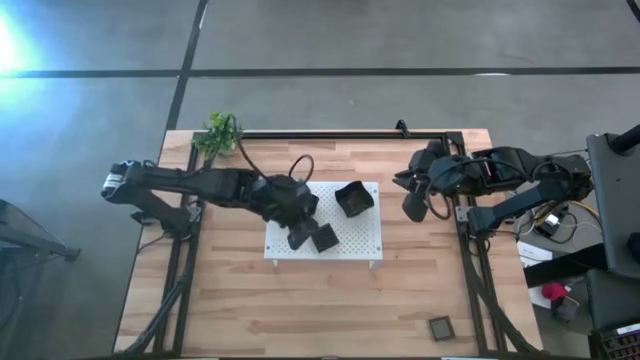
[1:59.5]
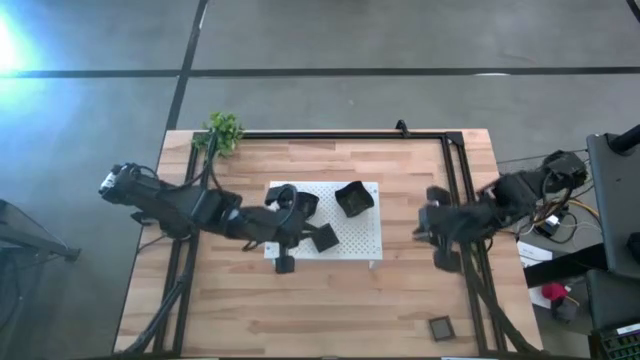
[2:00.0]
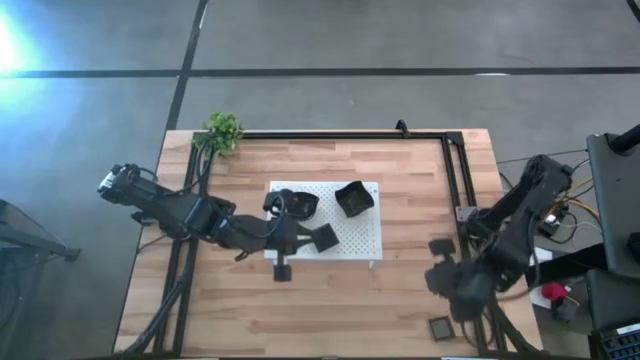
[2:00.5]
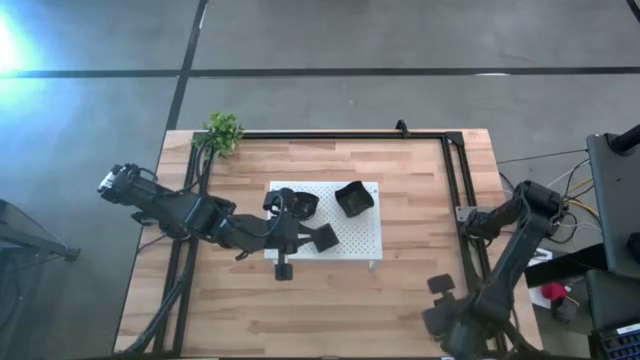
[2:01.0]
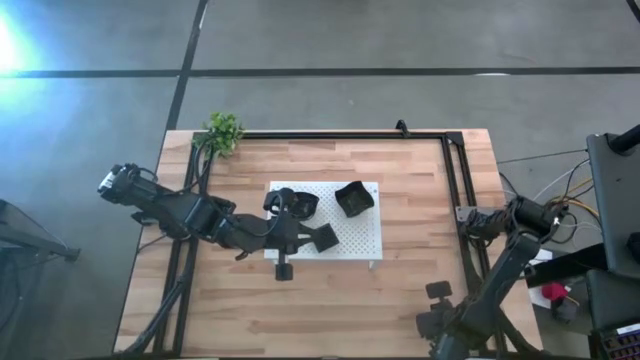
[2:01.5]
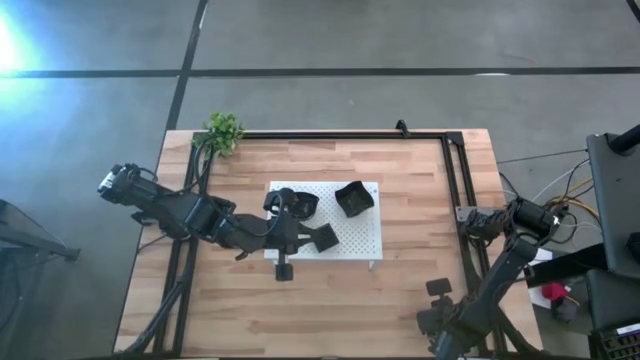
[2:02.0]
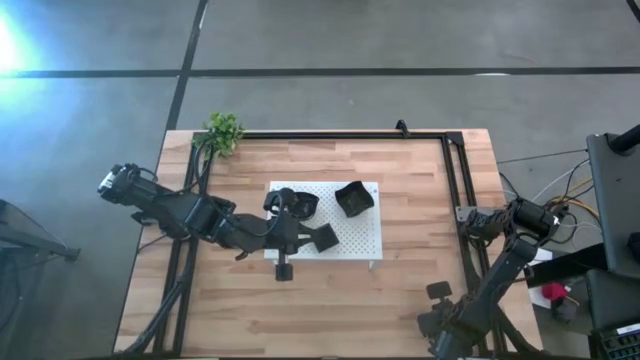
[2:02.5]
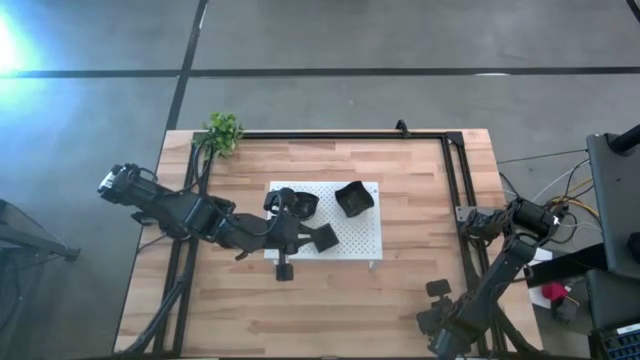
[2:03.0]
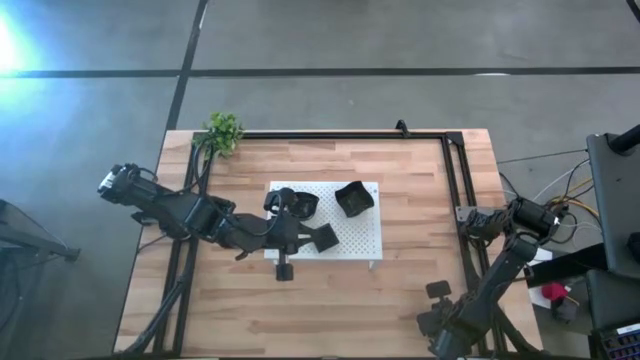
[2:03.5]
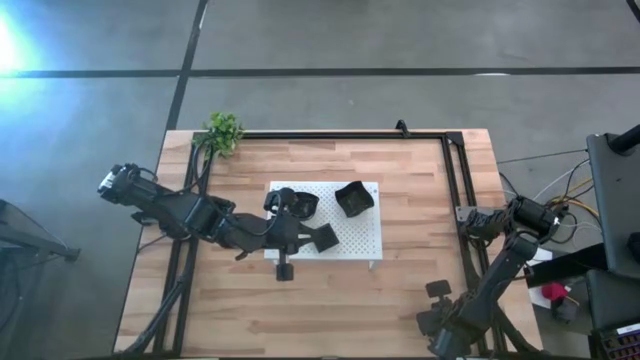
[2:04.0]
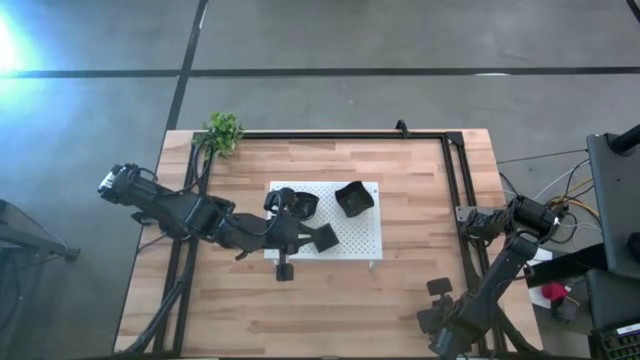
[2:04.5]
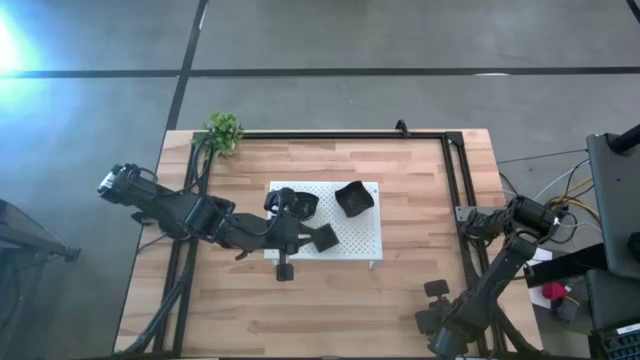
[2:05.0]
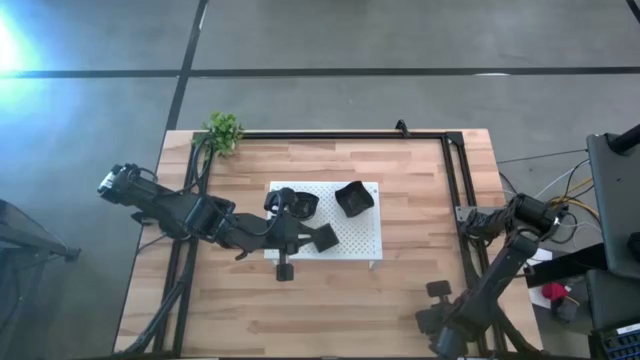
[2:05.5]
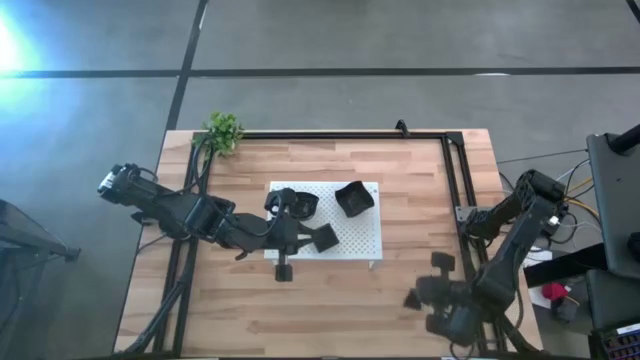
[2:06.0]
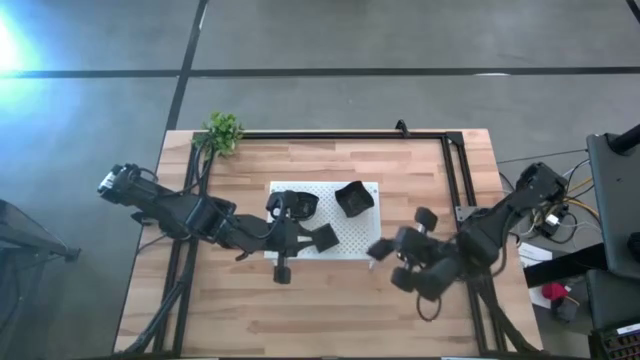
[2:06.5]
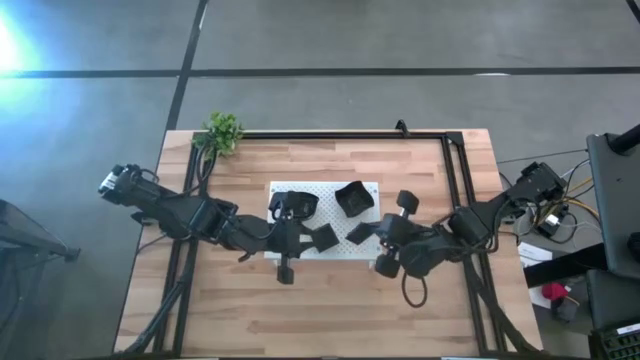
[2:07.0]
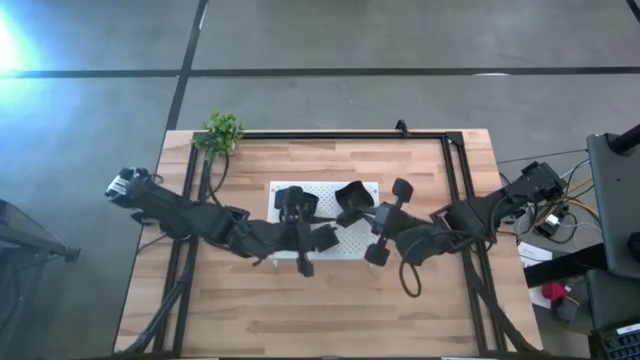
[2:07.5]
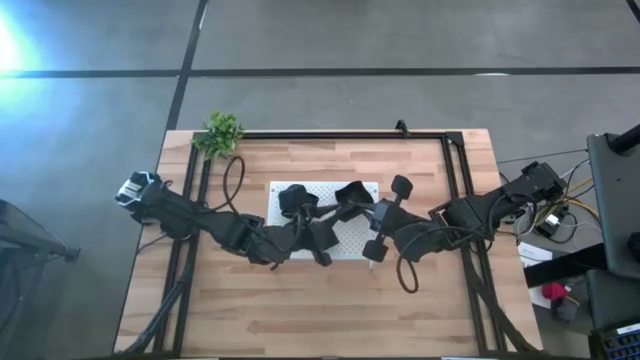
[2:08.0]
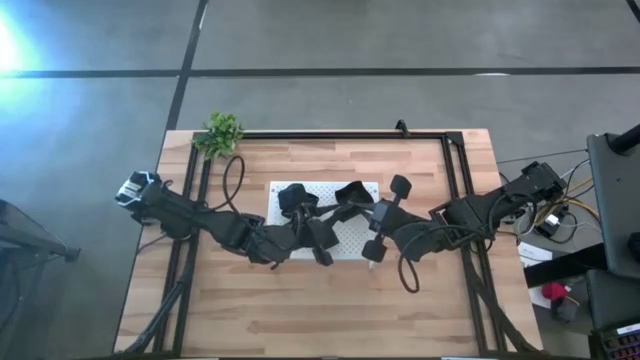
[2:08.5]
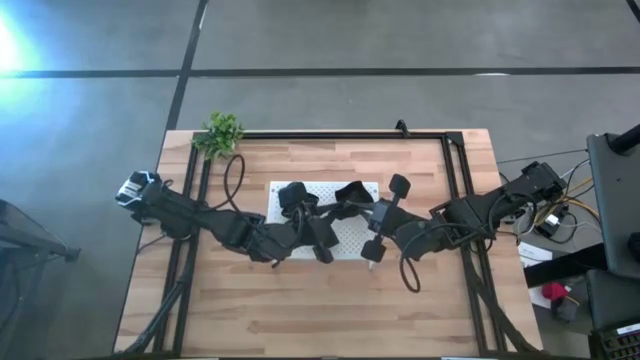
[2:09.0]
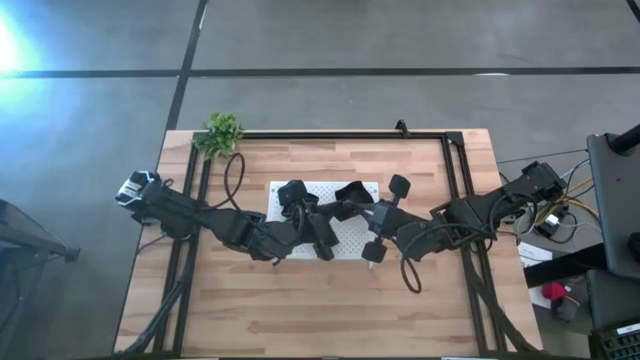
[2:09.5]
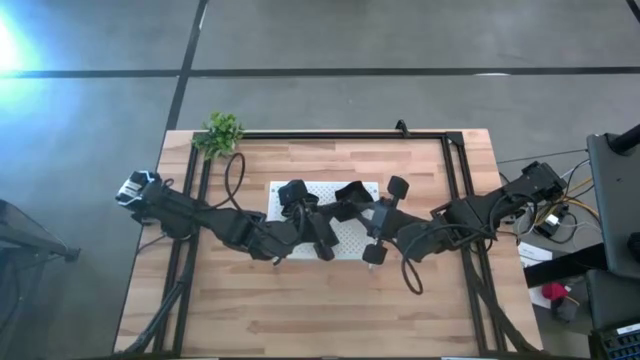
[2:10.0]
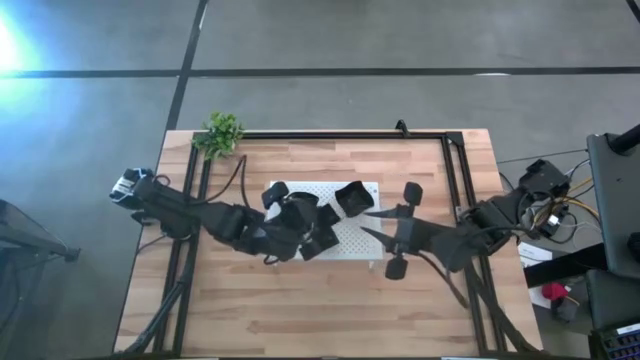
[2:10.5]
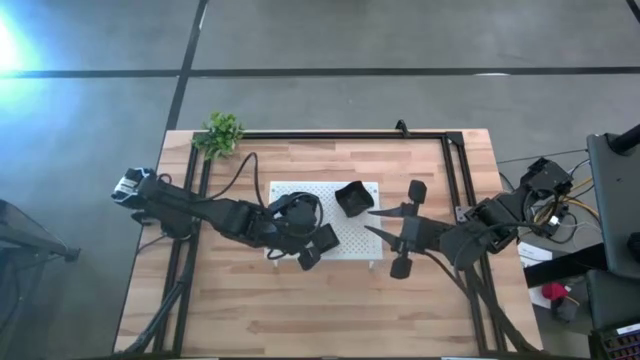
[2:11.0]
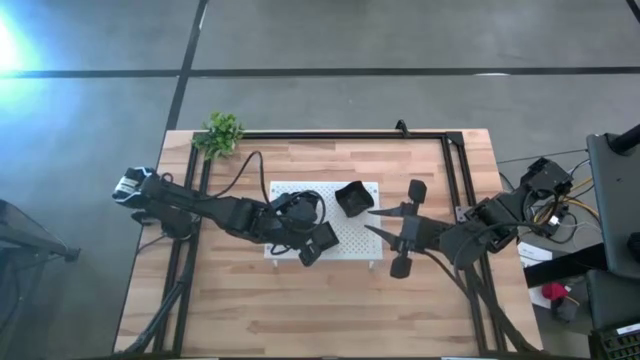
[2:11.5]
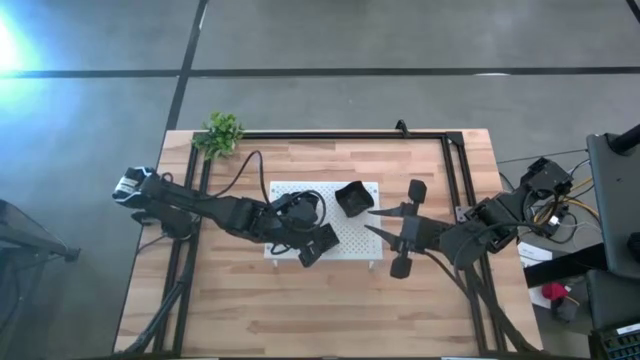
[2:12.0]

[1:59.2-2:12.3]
Task: Pick & Place Mini shaped plates
Stack the black square plate on top of the black square plate on the shelf

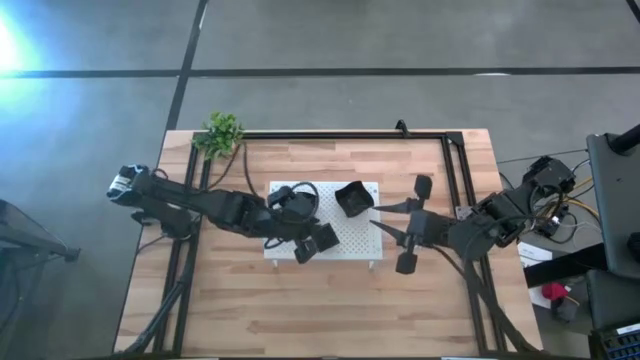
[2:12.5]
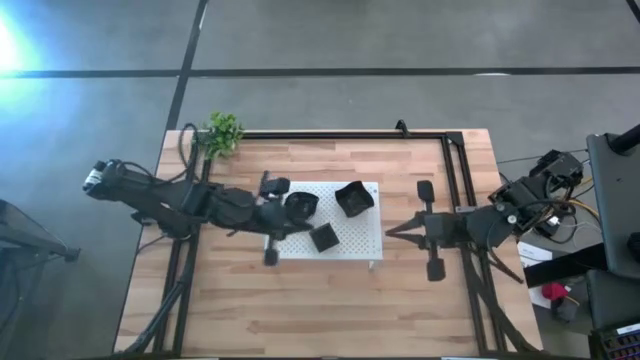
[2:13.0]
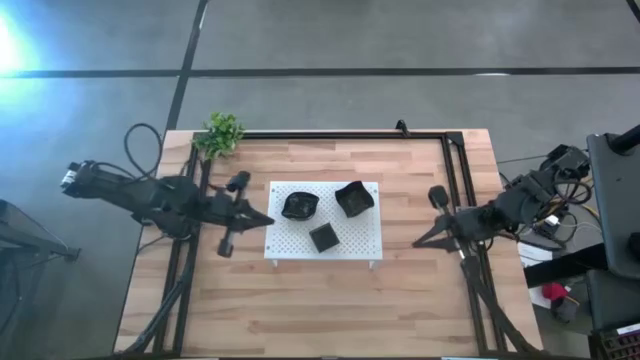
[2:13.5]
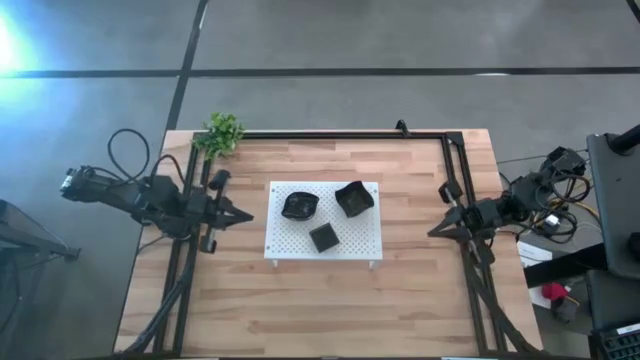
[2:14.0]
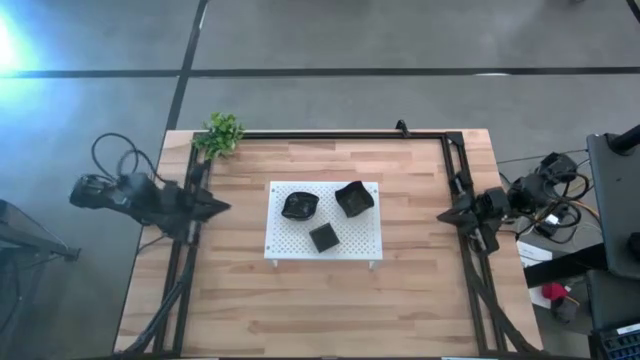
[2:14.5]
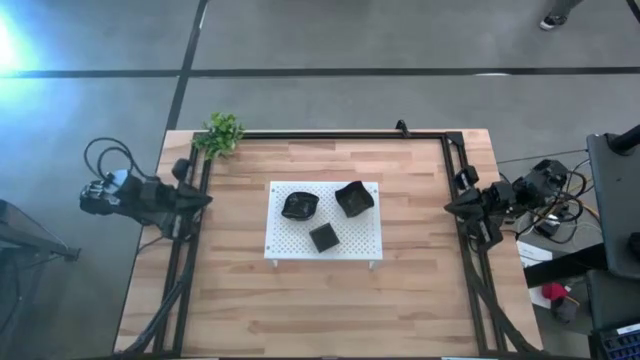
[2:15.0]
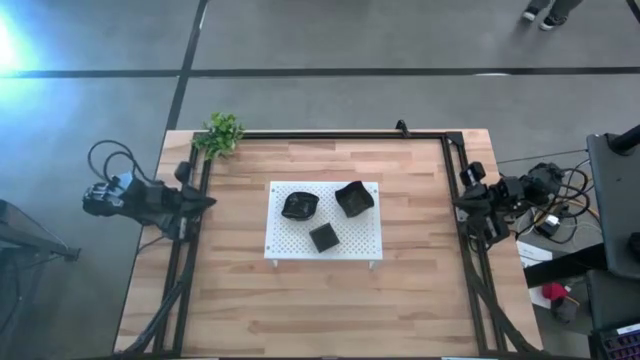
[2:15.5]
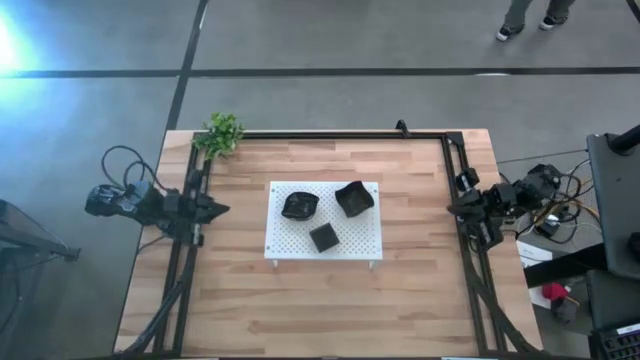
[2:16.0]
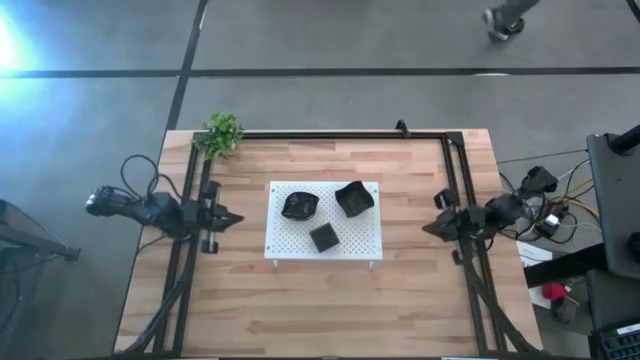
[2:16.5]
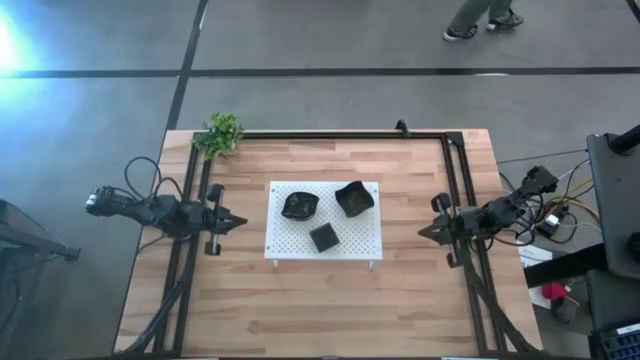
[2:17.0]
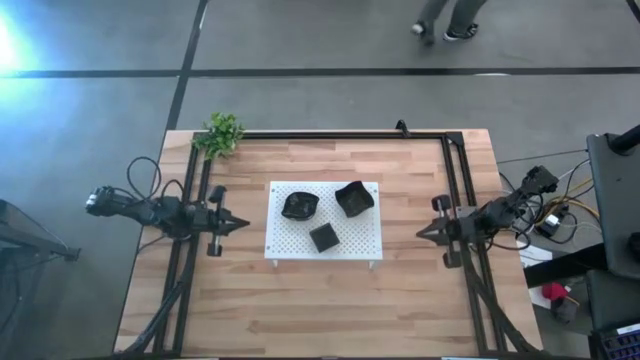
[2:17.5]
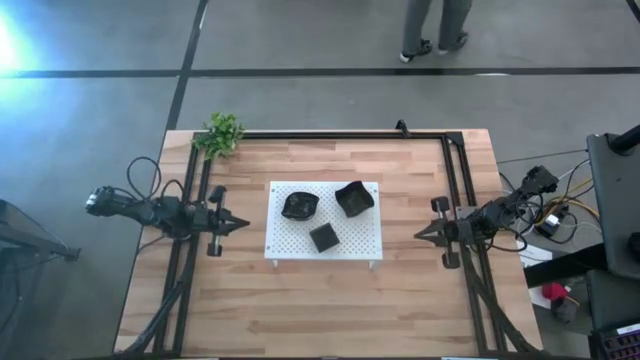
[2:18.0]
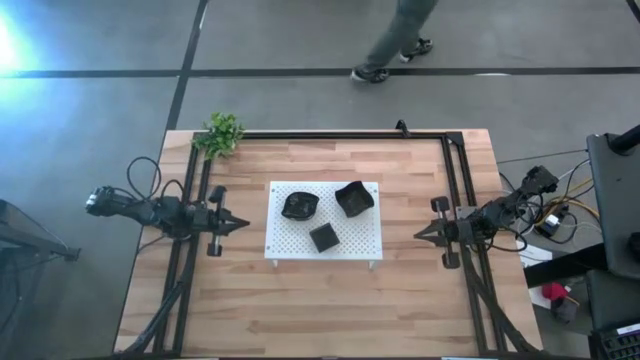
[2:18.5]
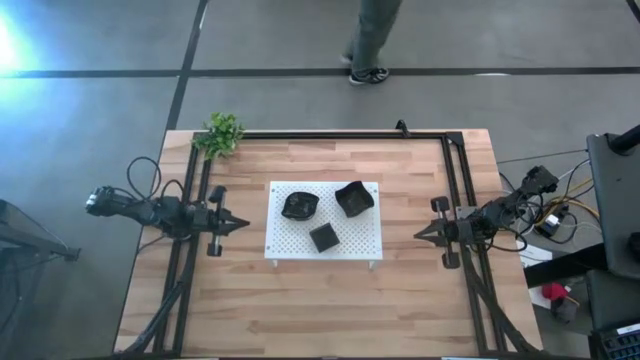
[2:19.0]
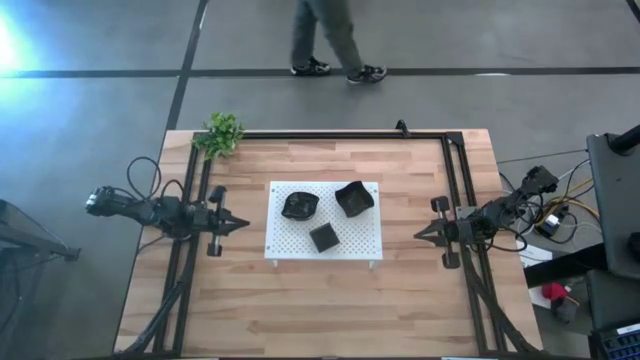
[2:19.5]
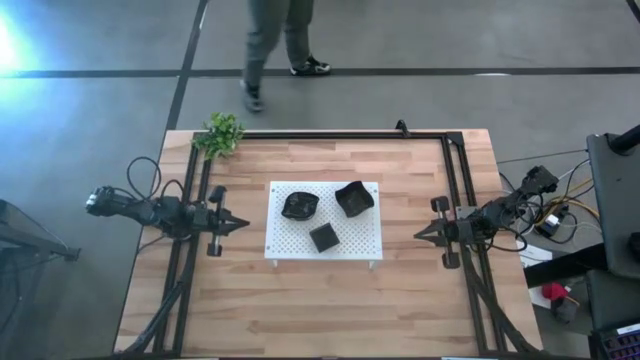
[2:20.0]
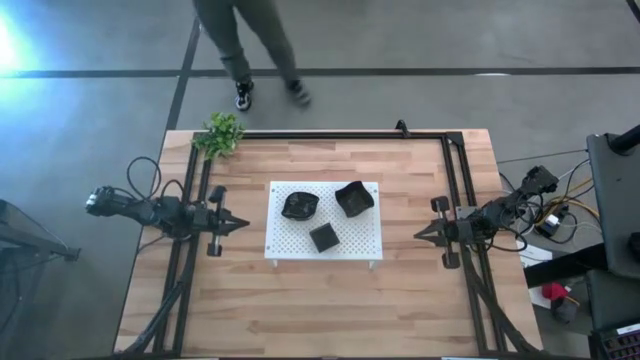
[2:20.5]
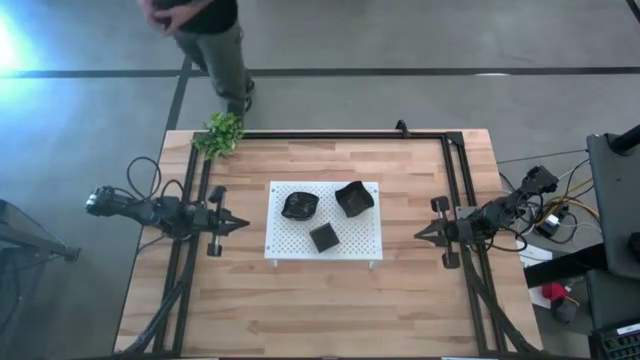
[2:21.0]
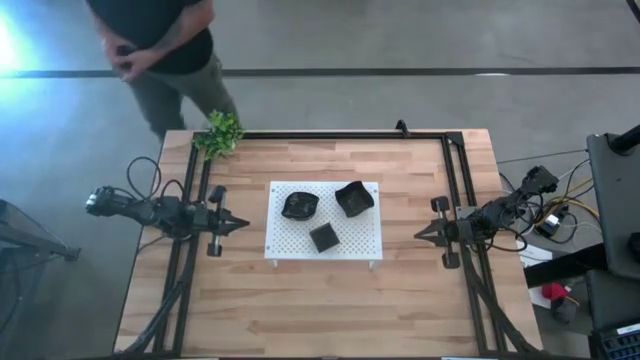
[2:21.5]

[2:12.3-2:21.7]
Return to Home Position
